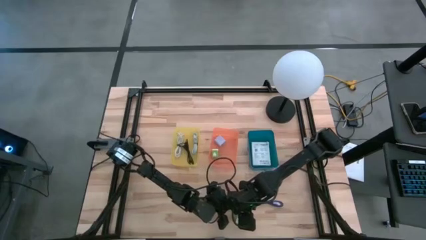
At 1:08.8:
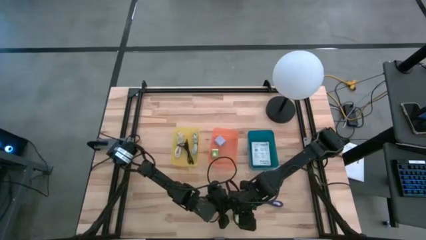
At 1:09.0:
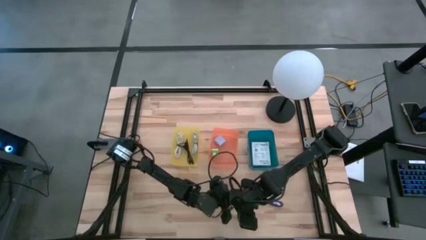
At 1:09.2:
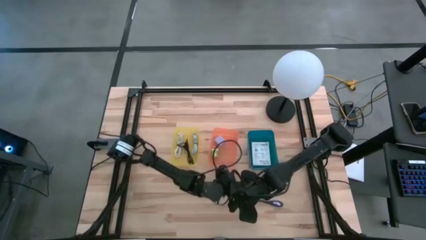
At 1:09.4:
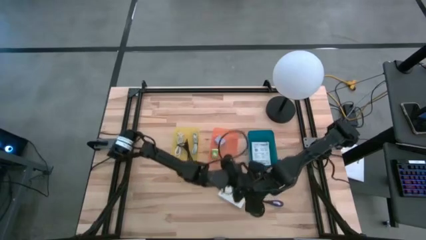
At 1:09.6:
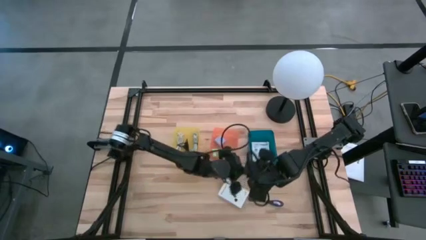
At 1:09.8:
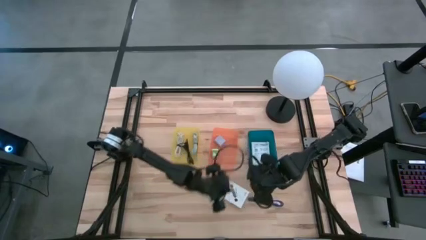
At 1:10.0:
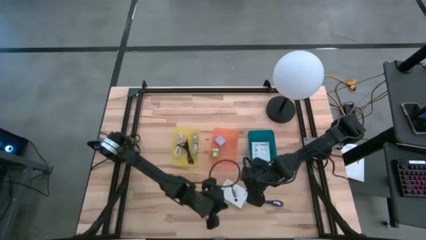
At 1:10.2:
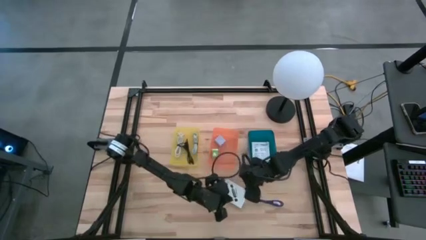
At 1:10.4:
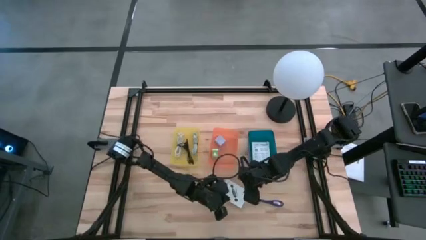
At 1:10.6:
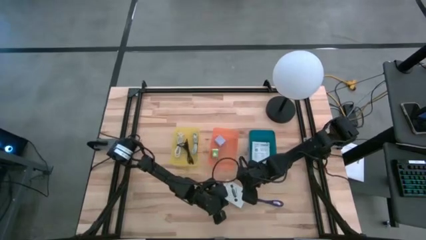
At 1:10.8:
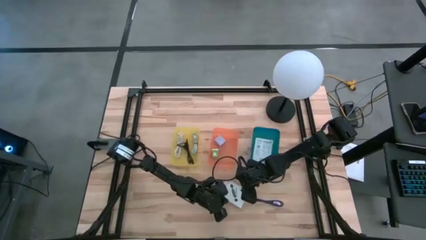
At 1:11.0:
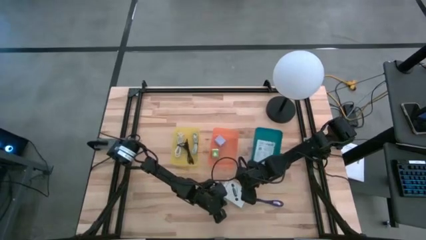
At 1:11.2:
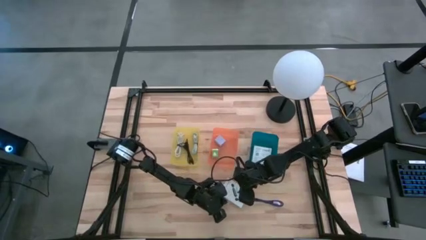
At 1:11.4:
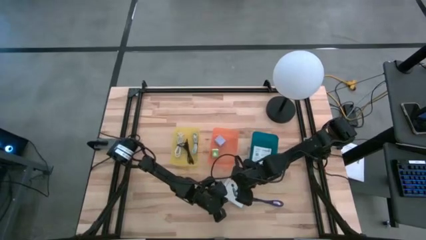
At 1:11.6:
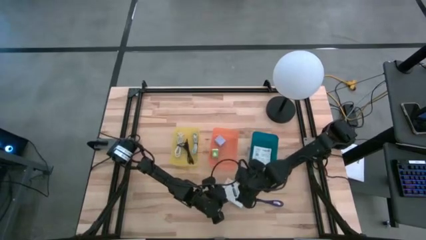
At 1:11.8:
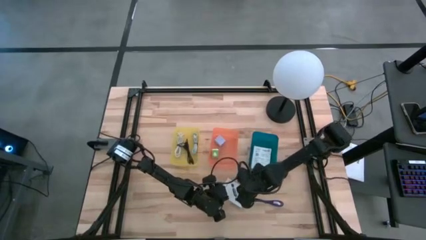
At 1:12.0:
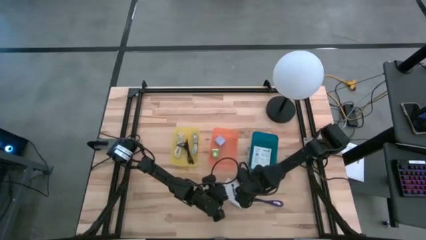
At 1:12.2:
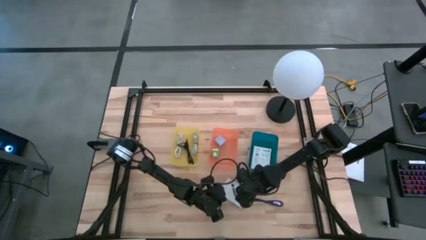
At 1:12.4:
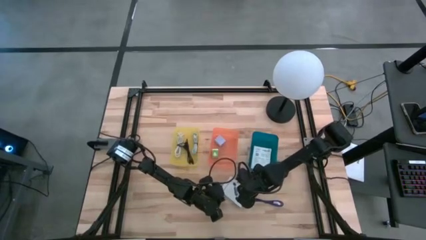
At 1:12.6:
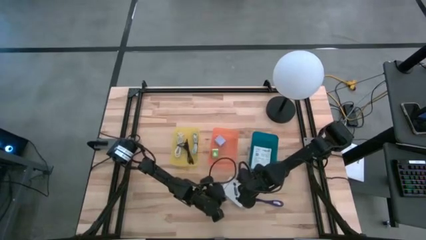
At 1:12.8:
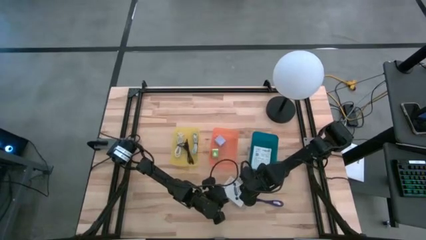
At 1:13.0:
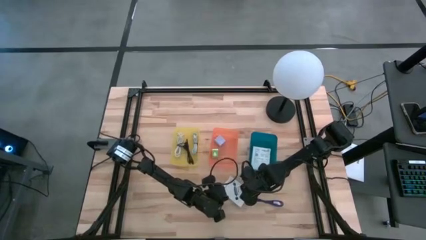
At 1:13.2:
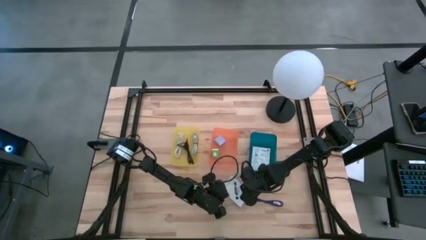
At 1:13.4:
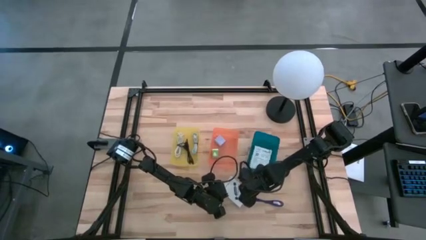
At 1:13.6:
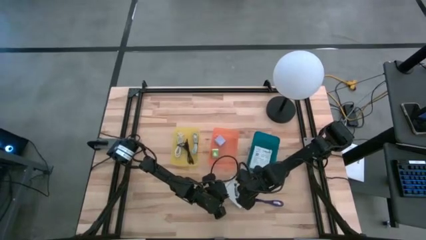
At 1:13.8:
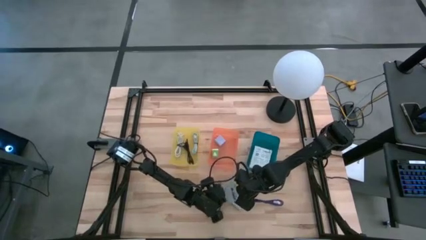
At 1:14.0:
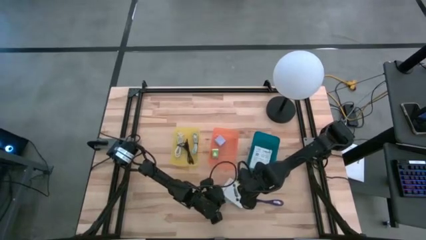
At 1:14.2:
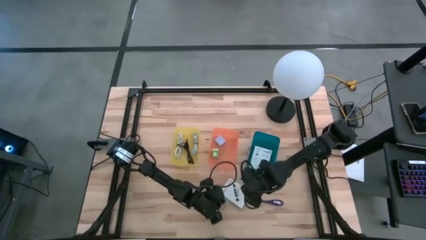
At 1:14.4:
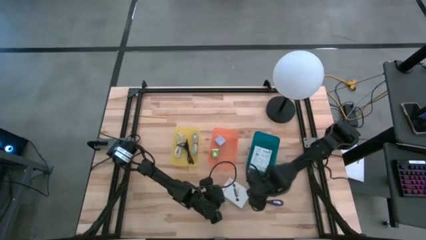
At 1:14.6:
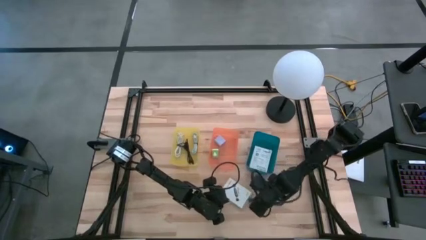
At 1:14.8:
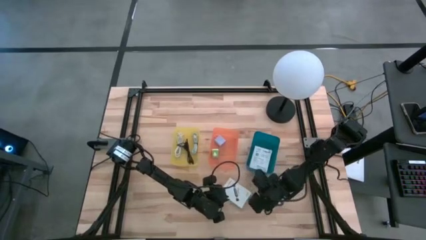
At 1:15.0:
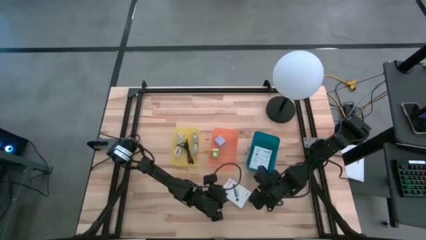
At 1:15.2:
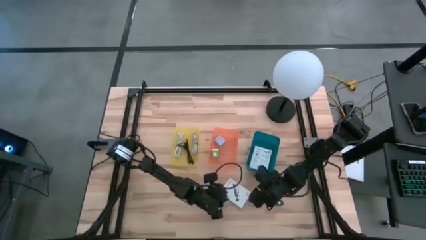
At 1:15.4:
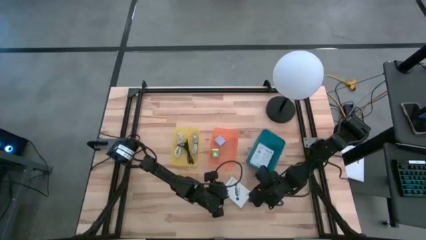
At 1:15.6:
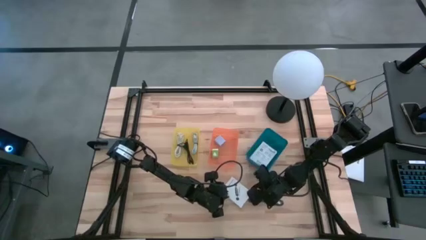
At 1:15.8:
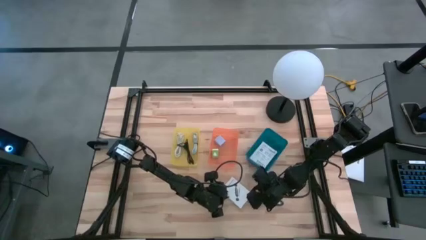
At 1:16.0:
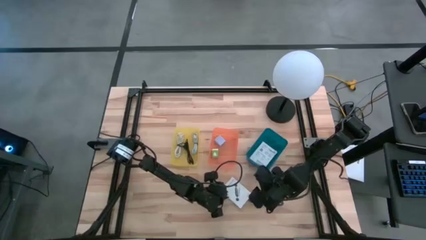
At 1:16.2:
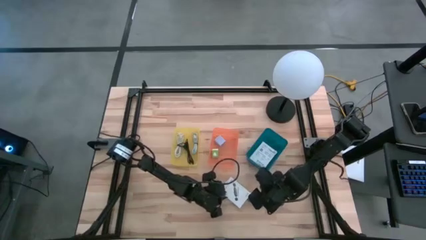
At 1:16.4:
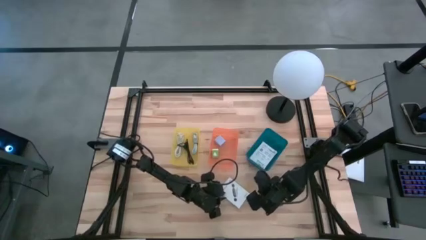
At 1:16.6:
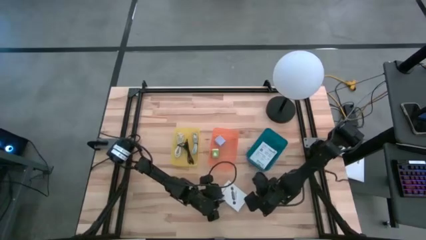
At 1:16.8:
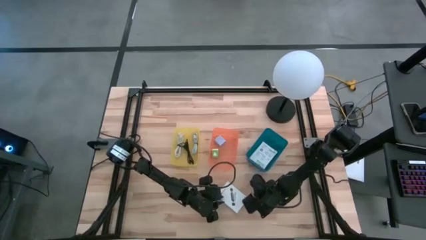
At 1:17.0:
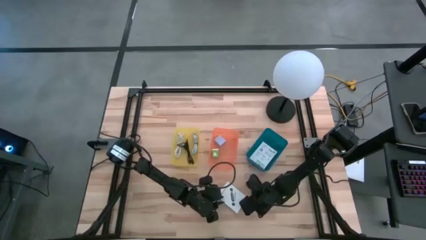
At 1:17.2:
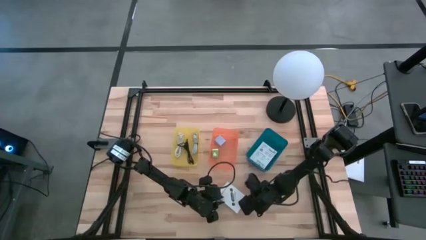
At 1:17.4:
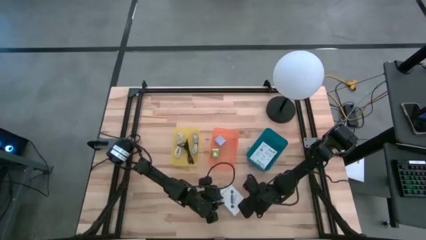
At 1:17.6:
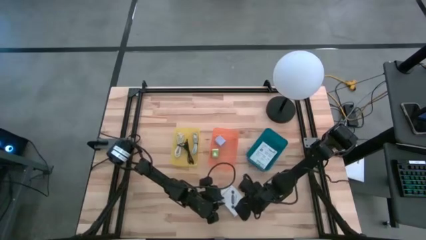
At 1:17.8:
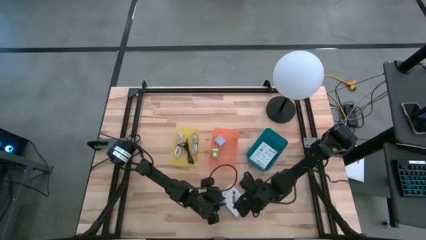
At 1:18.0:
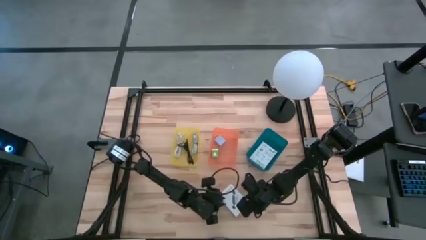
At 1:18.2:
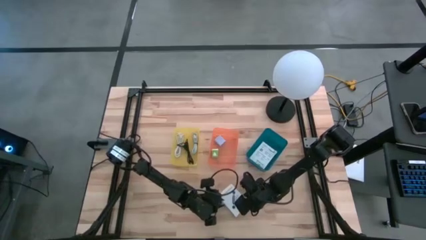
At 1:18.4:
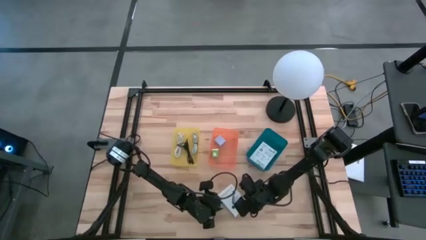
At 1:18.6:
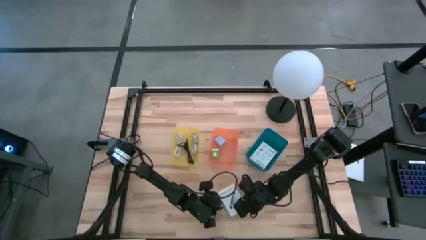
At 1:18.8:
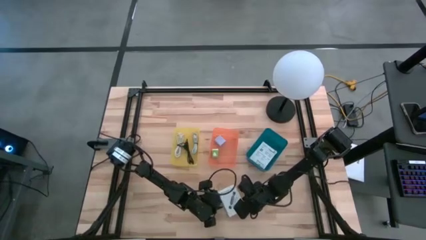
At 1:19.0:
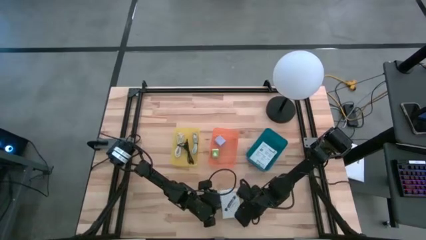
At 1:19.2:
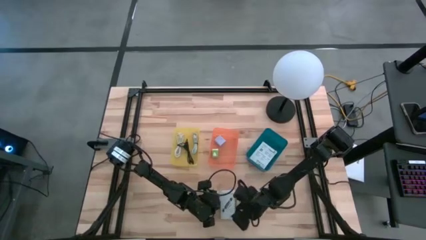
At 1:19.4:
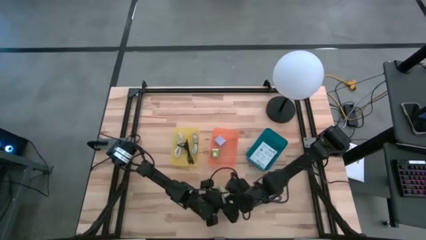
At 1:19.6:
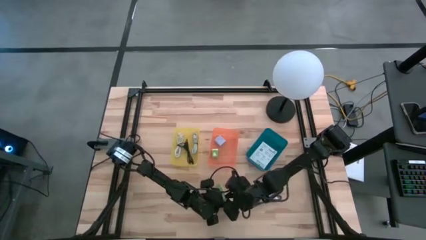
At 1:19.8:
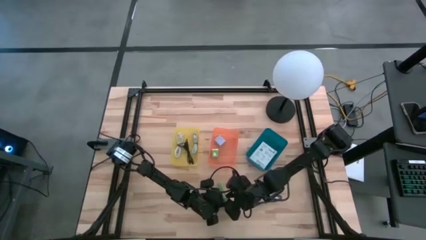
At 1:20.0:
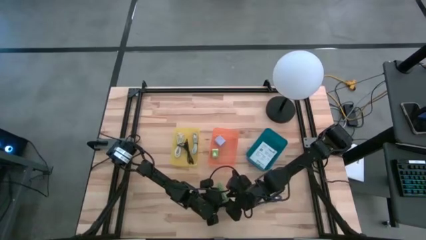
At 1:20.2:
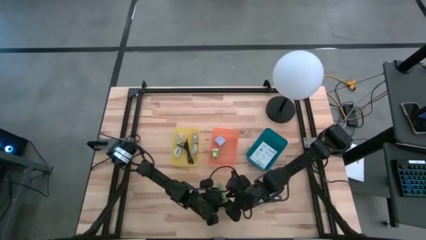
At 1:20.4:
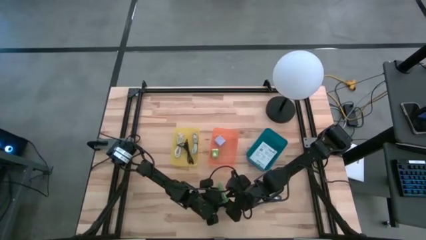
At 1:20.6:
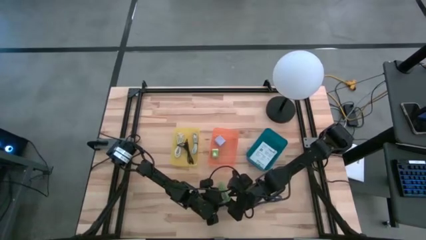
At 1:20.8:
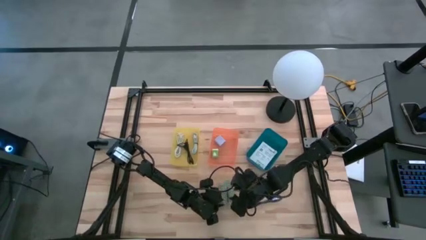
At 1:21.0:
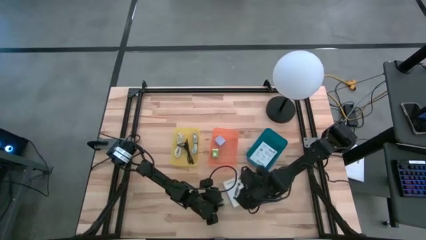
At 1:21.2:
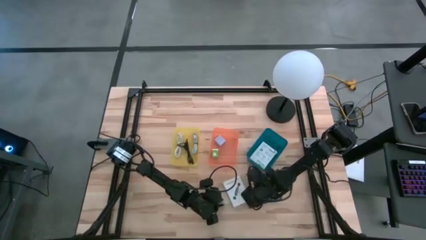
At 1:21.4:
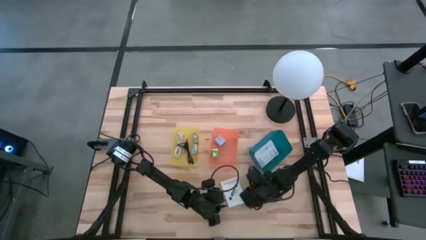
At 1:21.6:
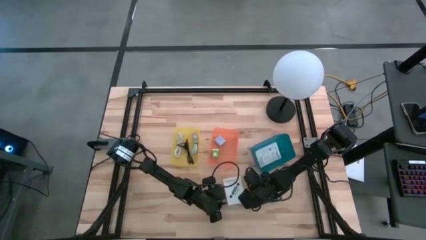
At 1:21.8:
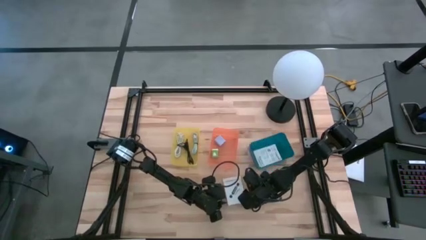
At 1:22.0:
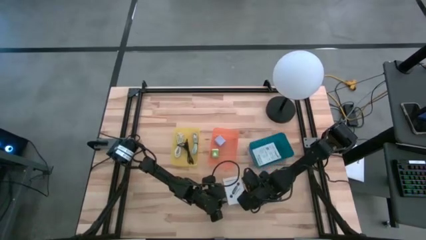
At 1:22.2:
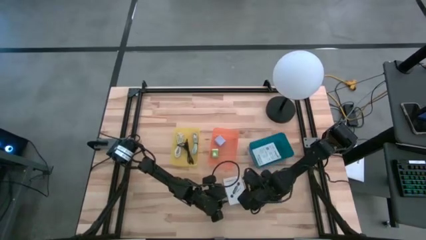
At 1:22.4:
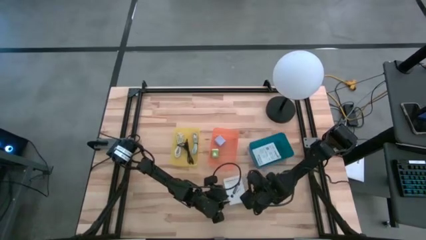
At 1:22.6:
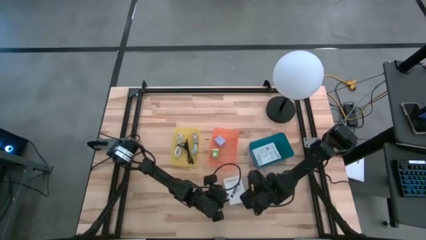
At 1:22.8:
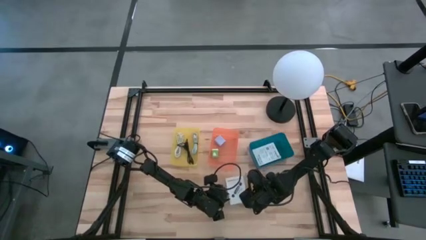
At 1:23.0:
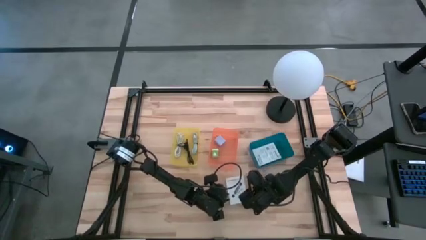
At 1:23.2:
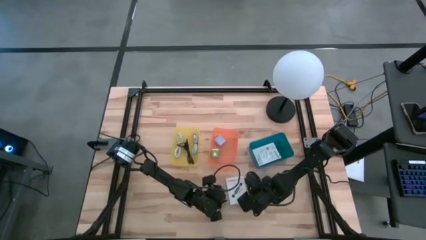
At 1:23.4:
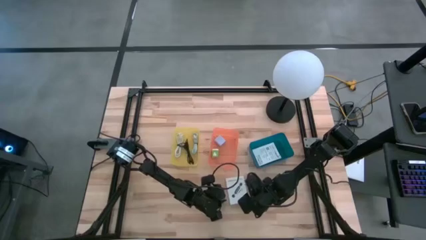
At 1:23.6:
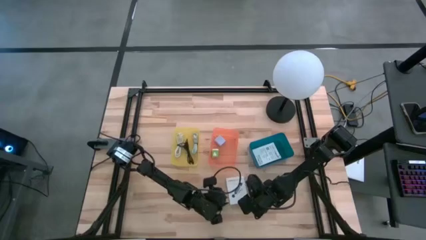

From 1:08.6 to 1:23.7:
Task: Pick and place items into bin
Put the white card reader box into the blue bin

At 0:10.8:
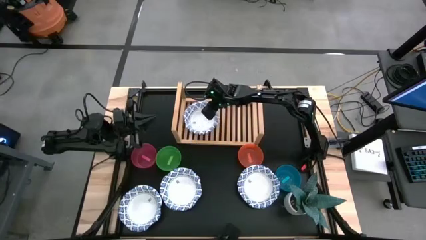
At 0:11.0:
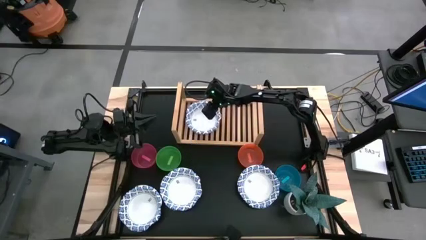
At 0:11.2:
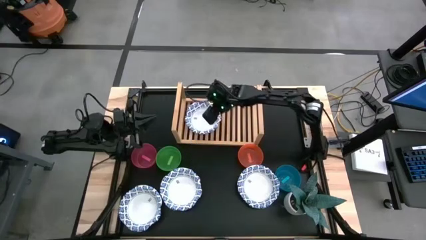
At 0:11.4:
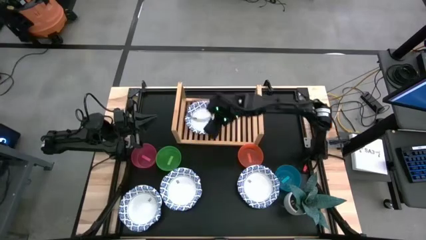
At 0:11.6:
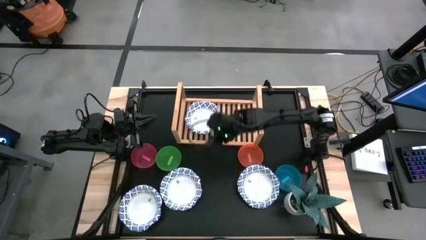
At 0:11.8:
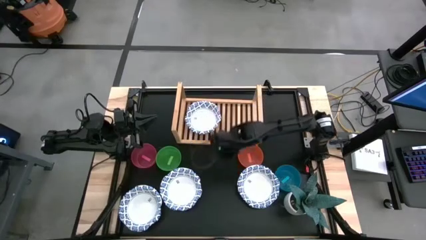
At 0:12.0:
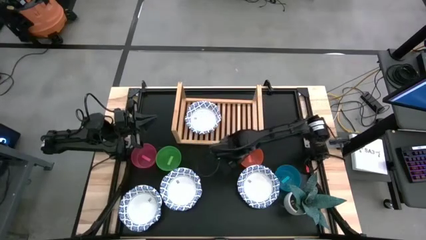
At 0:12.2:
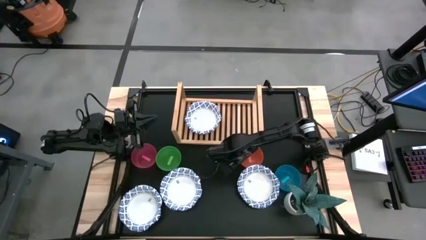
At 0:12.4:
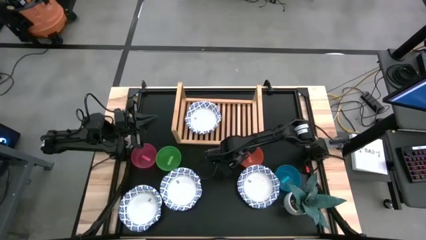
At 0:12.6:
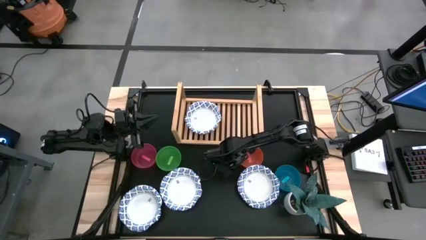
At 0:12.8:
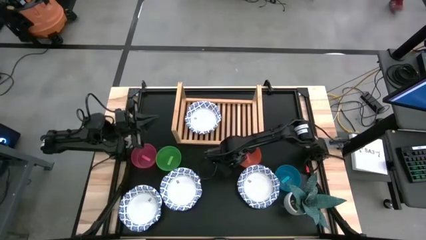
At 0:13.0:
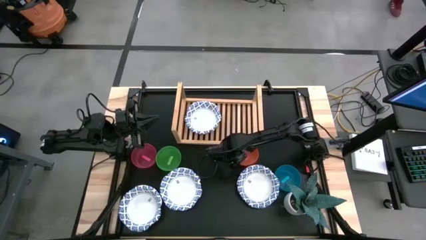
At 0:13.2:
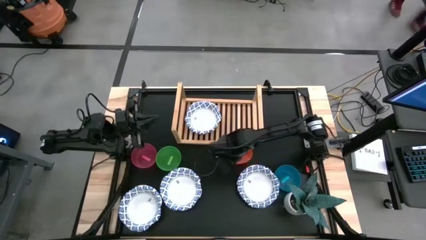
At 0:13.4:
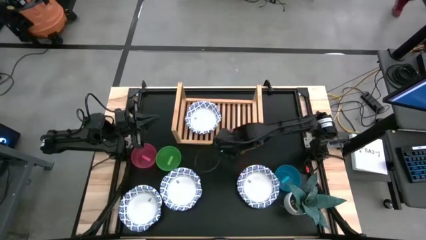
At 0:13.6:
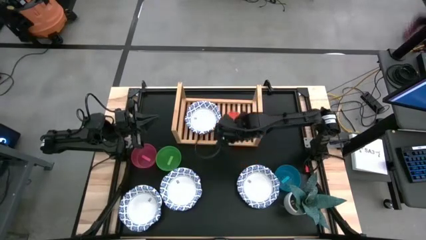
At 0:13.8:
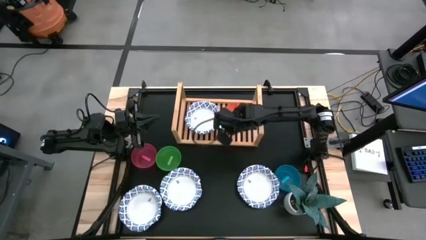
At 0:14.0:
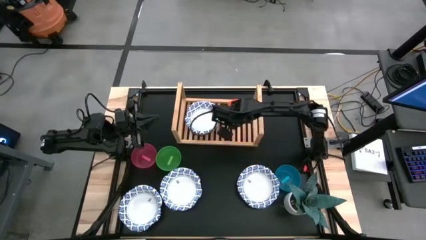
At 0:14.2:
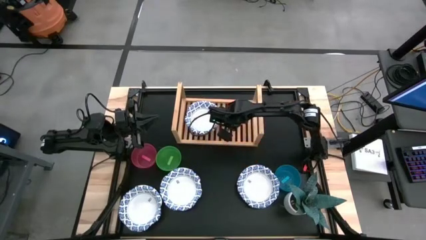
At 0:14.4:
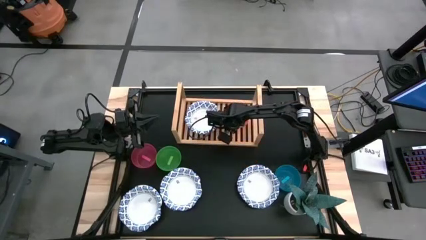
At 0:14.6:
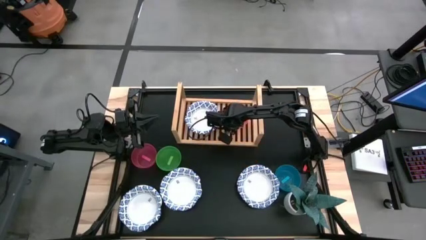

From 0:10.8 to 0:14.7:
Task: Place and stack bowls onto a shelf
Put the small orange bowl on the shelf
